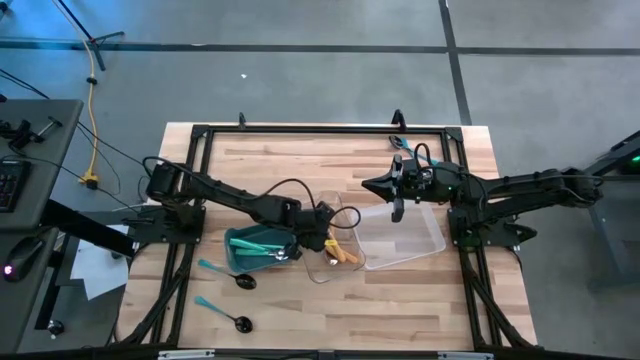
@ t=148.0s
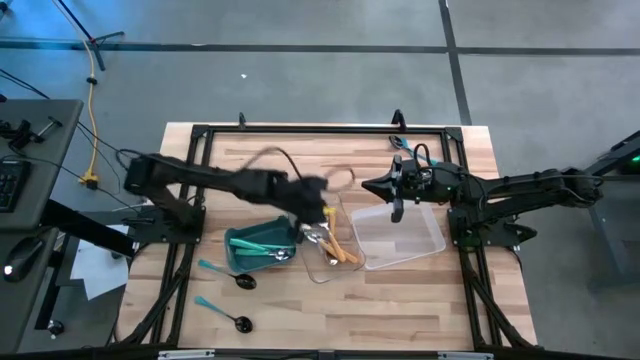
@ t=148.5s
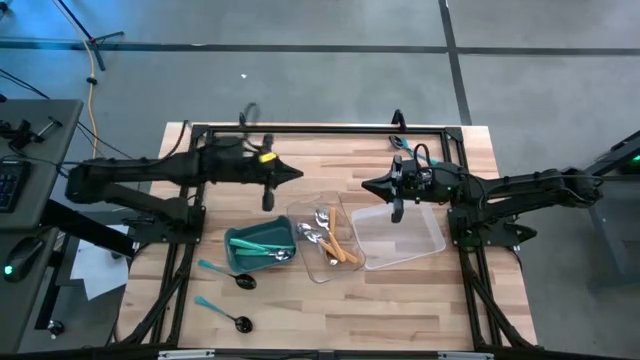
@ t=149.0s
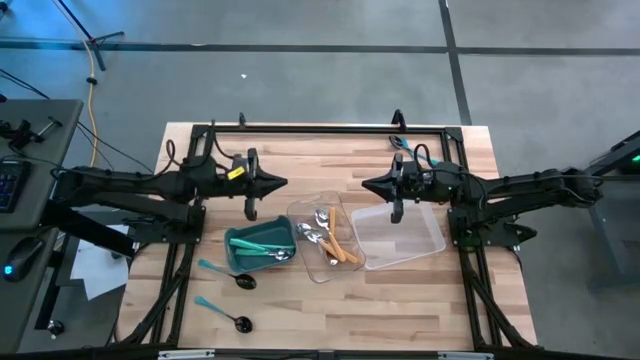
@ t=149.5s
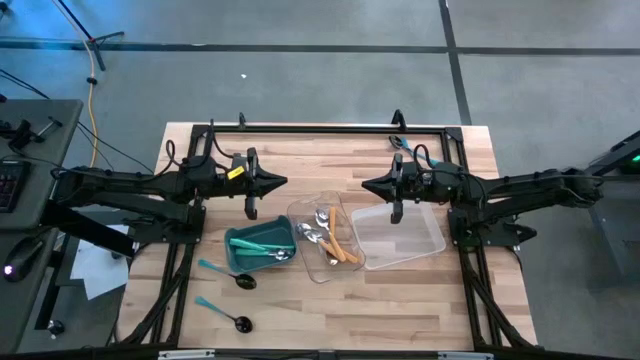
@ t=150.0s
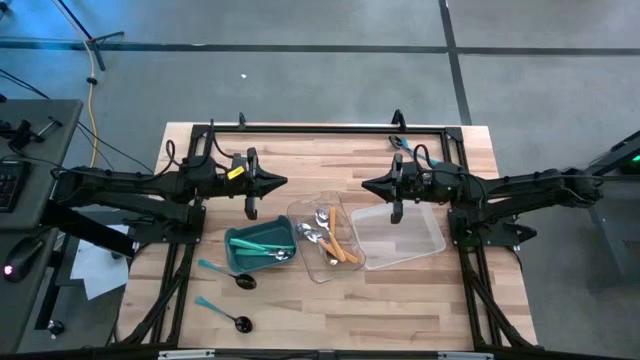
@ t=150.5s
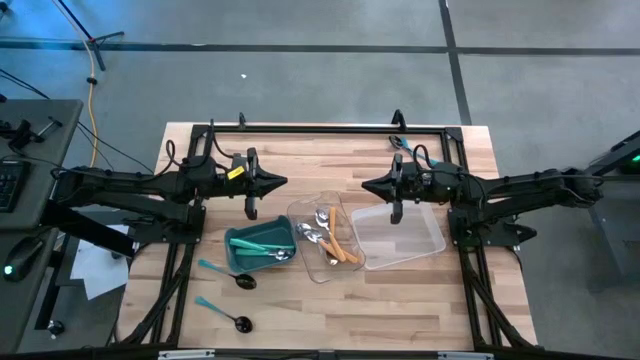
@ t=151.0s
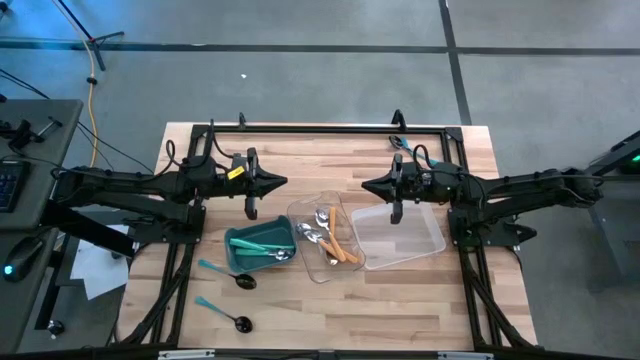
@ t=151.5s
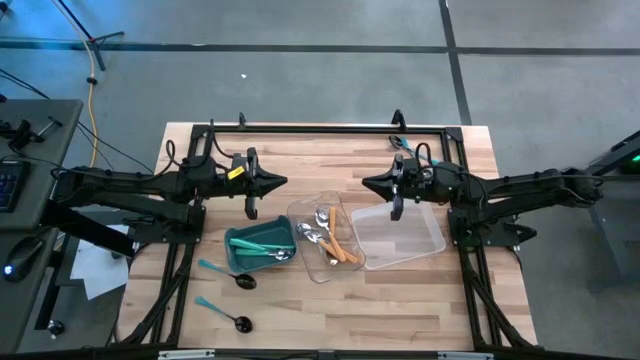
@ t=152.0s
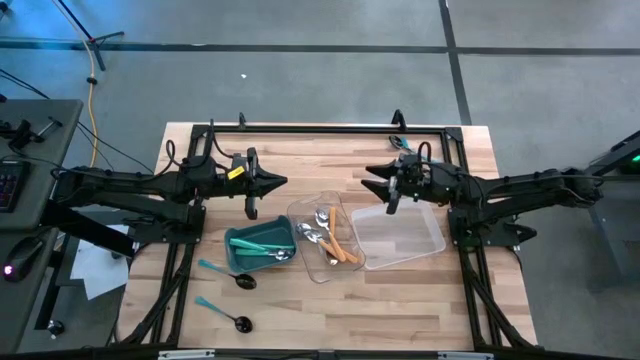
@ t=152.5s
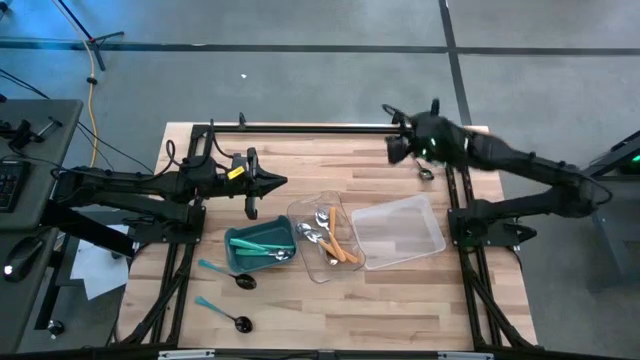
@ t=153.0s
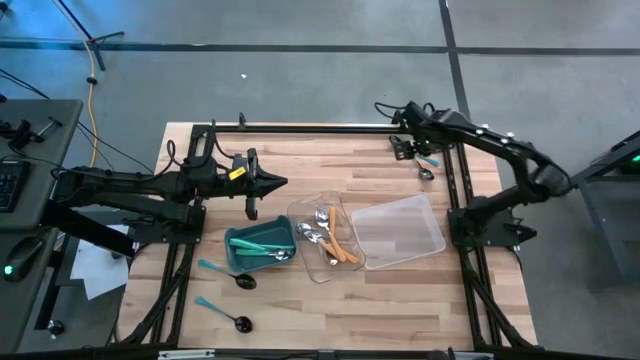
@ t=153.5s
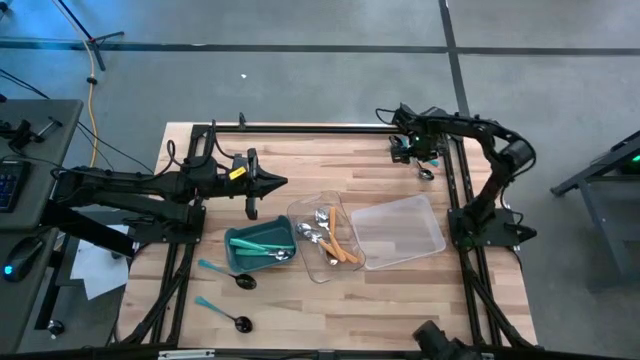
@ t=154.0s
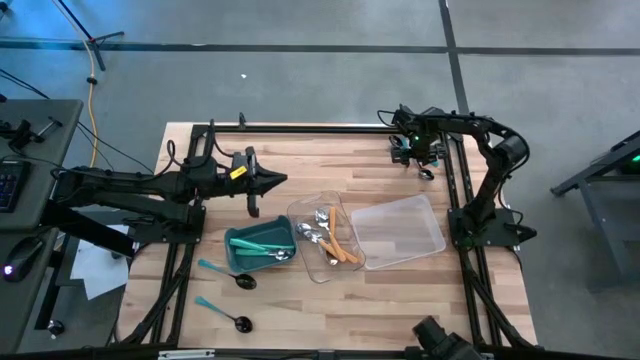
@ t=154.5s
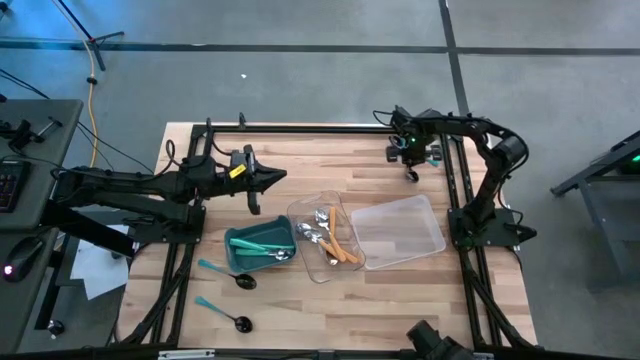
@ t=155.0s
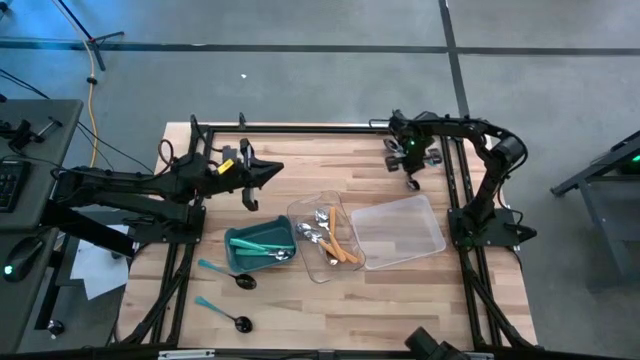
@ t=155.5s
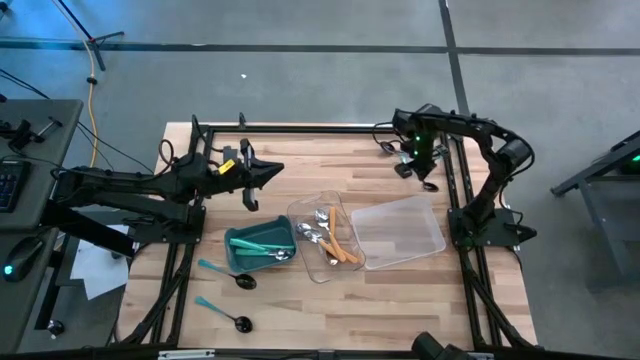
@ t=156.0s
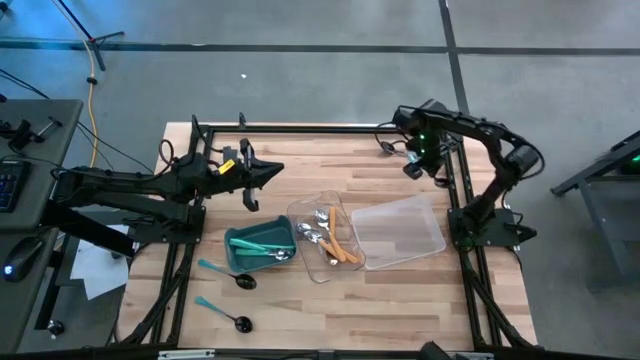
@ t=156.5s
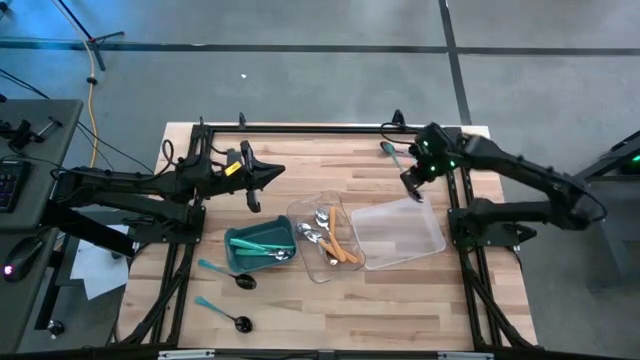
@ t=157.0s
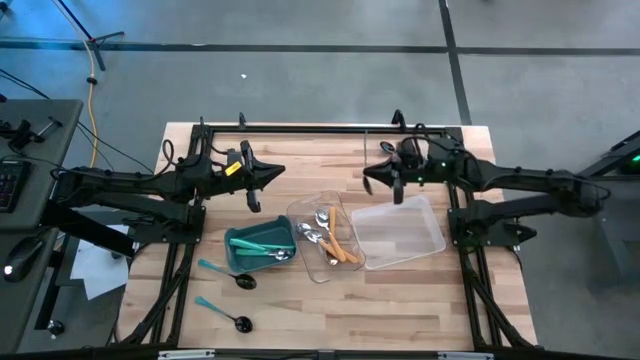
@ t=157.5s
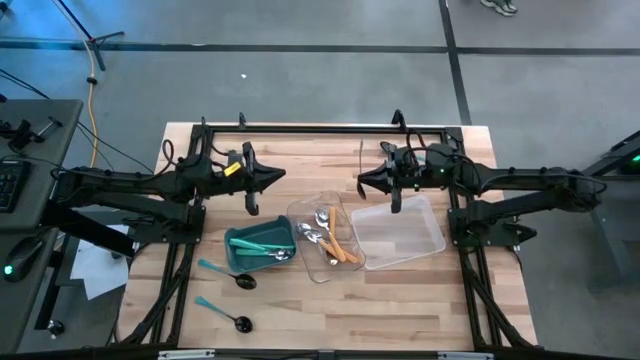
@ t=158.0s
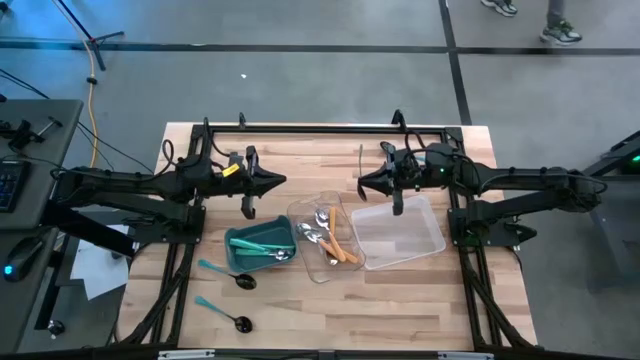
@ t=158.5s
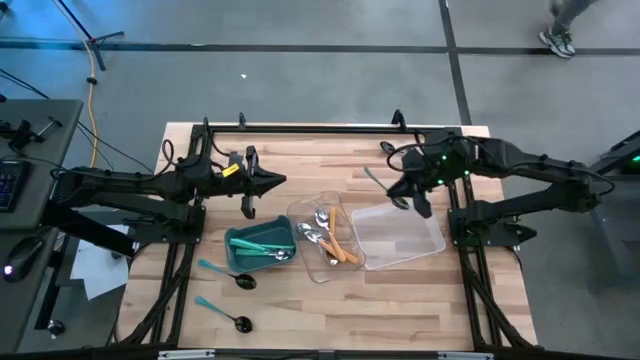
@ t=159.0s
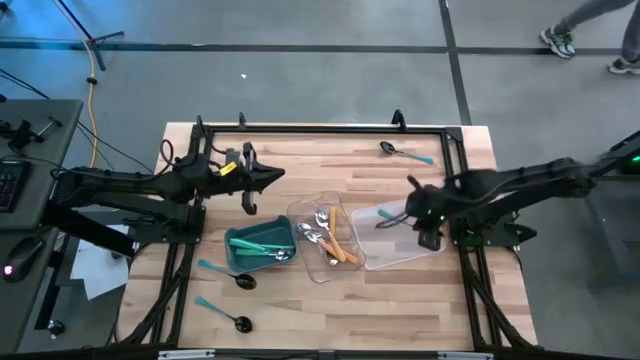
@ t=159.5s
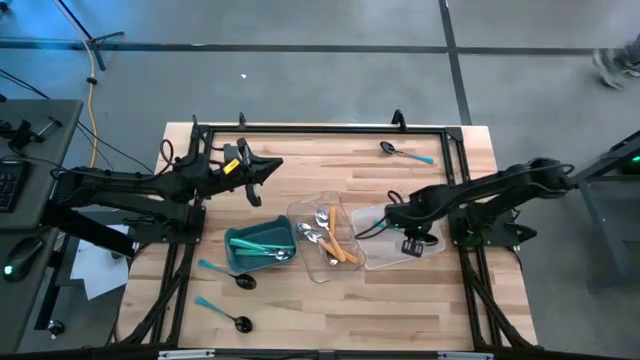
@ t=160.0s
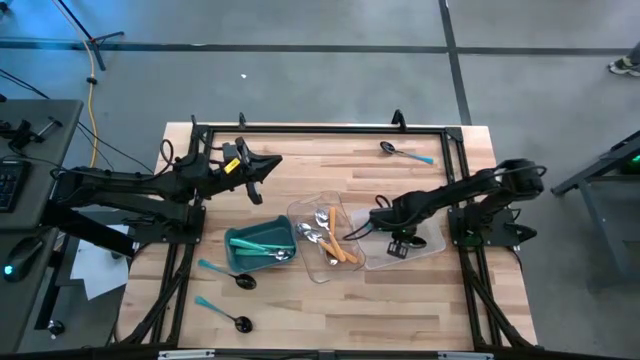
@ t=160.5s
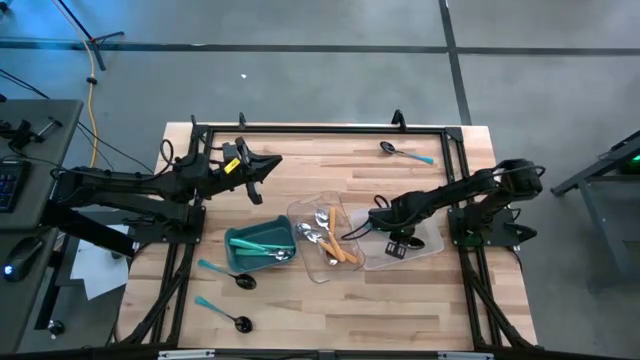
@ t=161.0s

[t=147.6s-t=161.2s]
Task: Sort silverware by color (type)
Put the blue spoon into the white bin

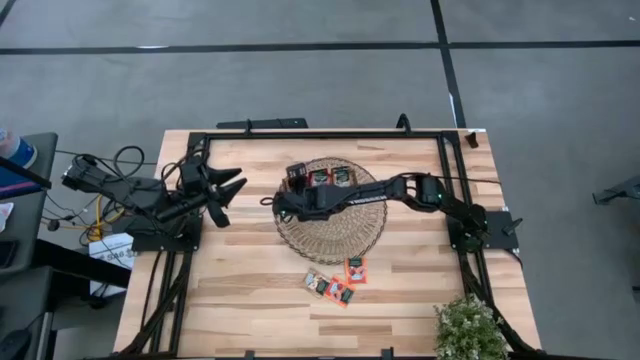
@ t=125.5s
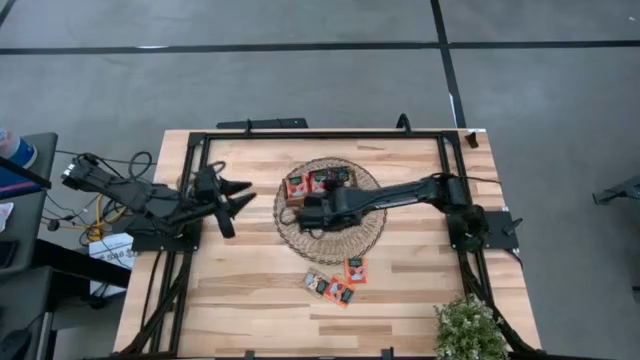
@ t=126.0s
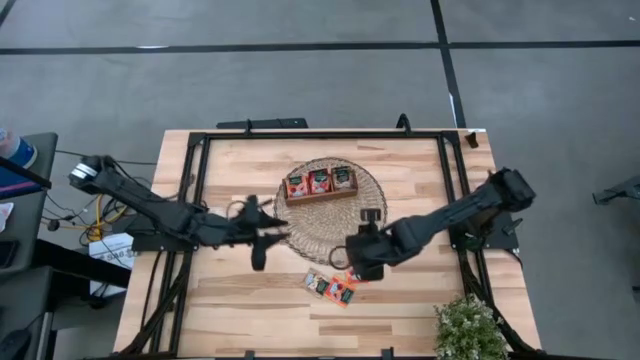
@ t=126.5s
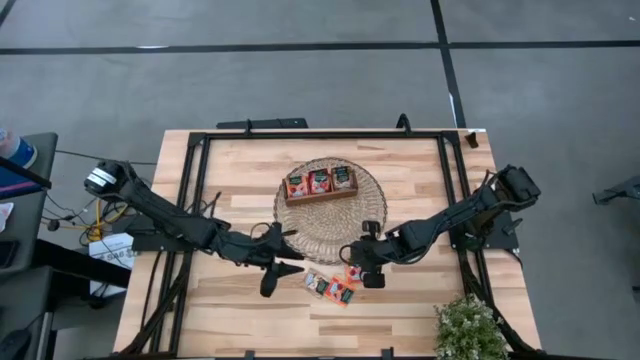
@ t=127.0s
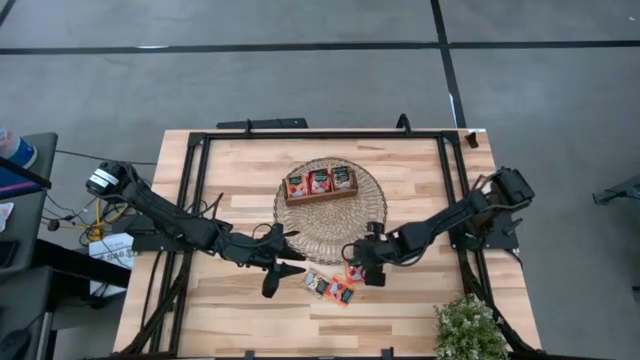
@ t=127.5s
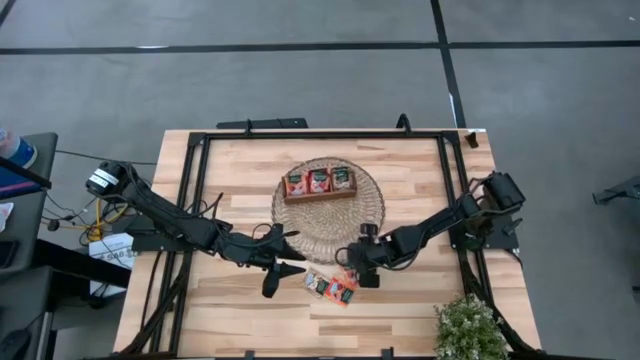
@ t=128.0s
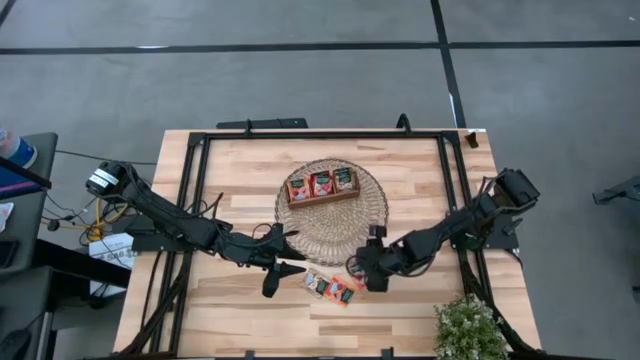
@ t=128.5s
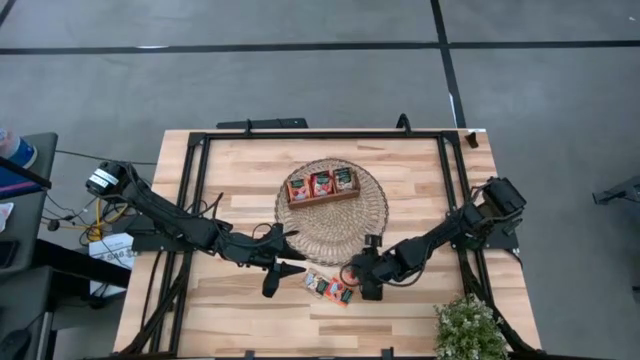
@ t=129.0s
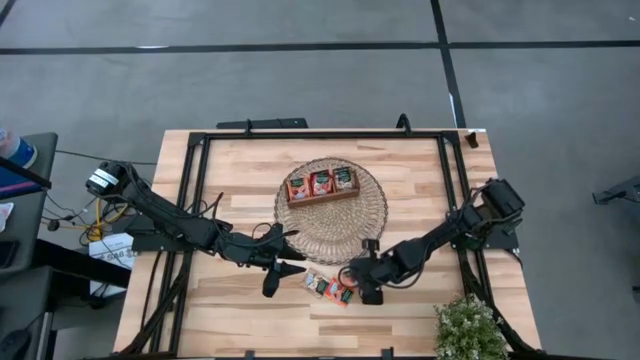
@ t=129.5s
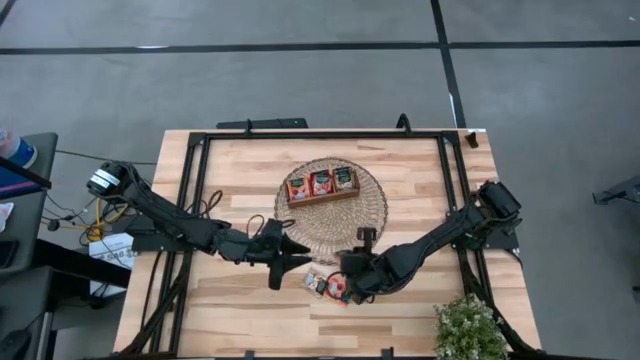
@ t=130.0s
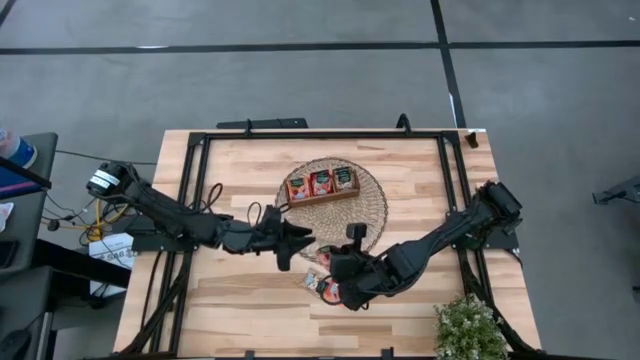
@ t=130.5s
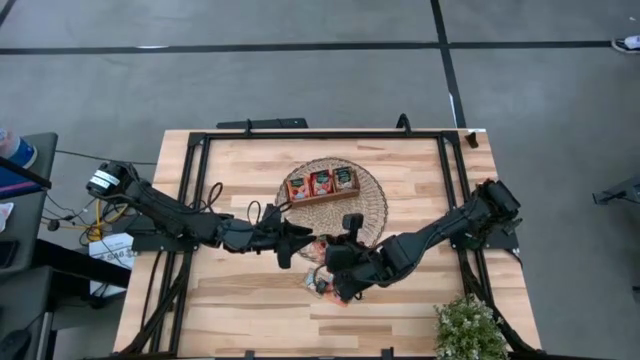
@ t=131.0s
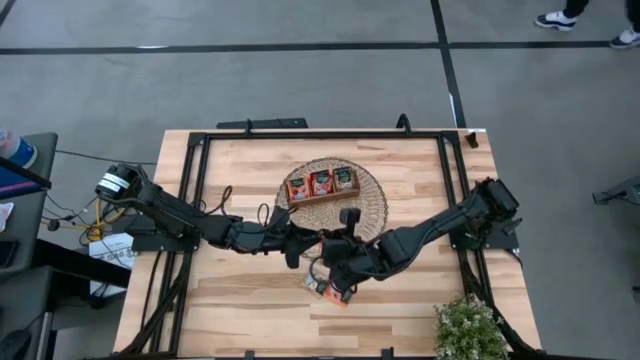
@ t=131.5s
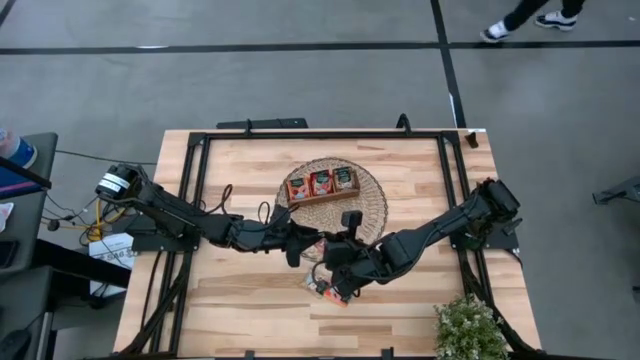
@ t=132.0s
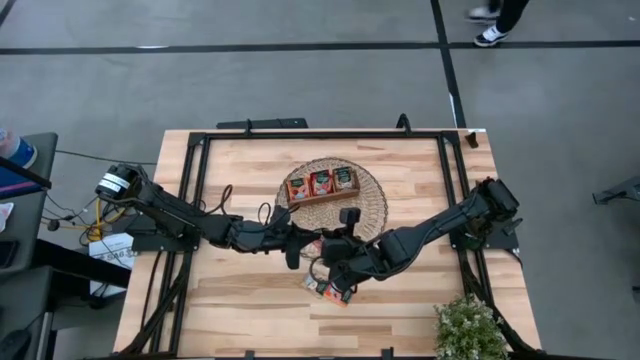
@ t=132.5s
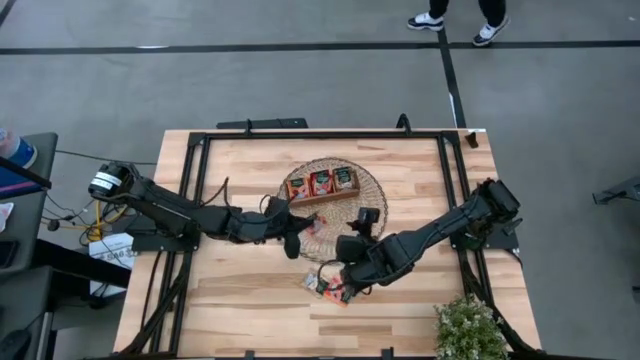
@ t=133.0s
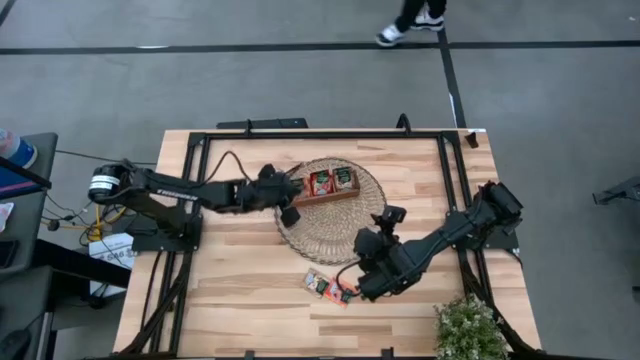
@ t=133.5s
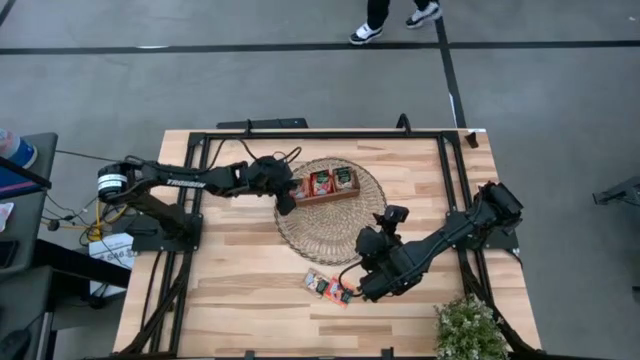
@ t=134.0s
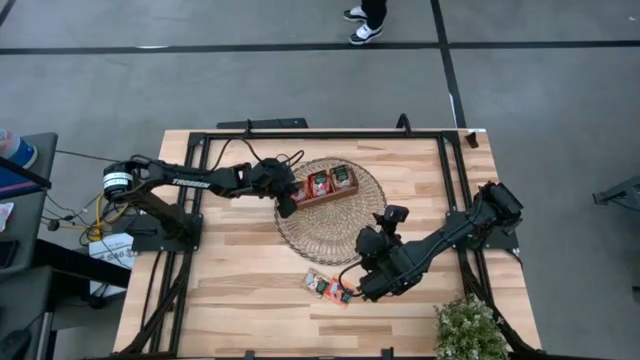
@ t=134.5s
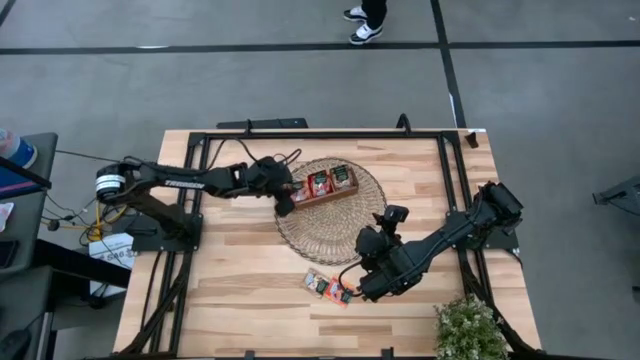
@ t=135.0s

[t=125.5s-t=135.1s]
Task: Pick & Place Tea
Put the top orange tea bag into the left side of the wooden organizer
